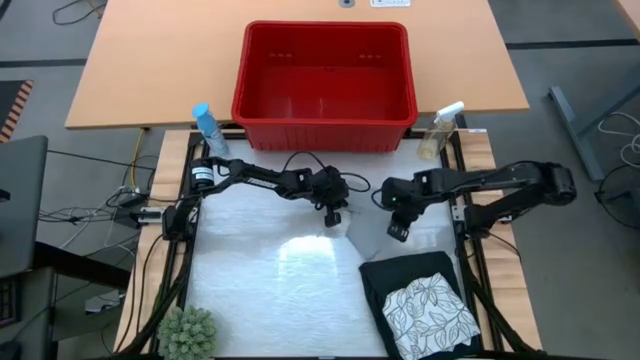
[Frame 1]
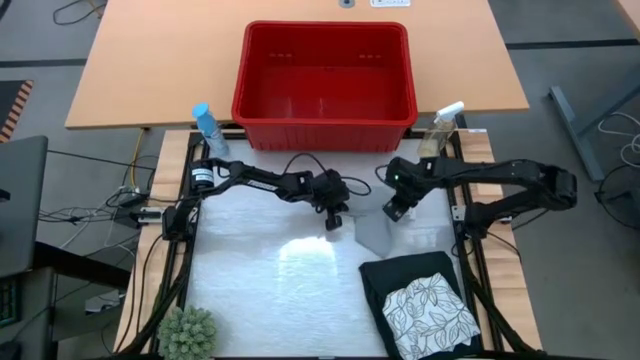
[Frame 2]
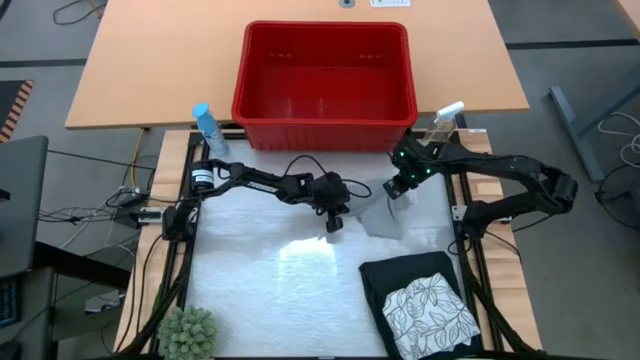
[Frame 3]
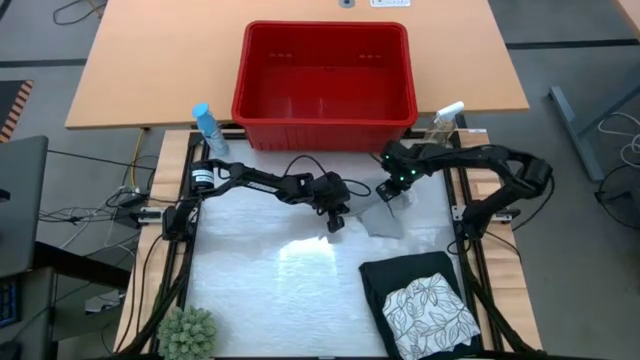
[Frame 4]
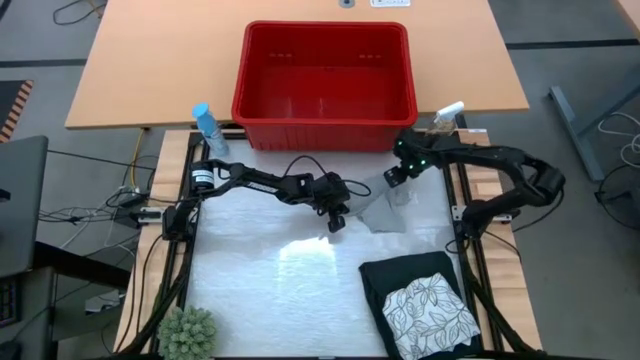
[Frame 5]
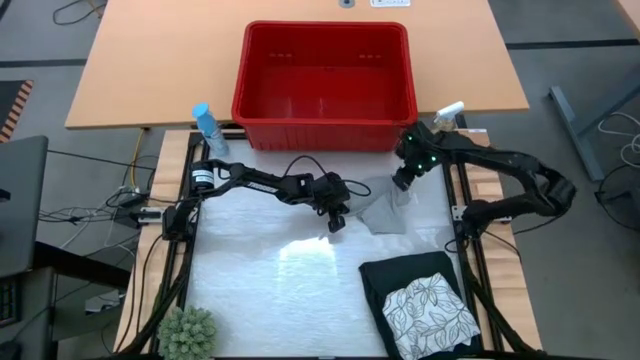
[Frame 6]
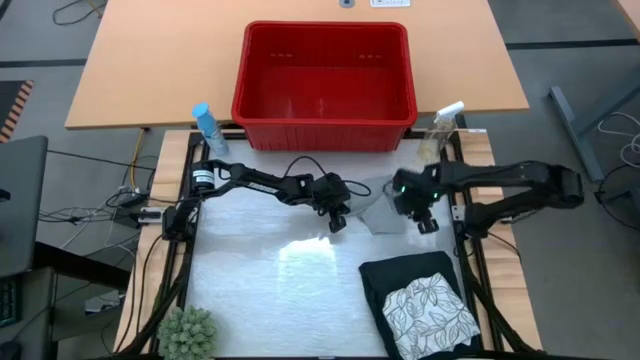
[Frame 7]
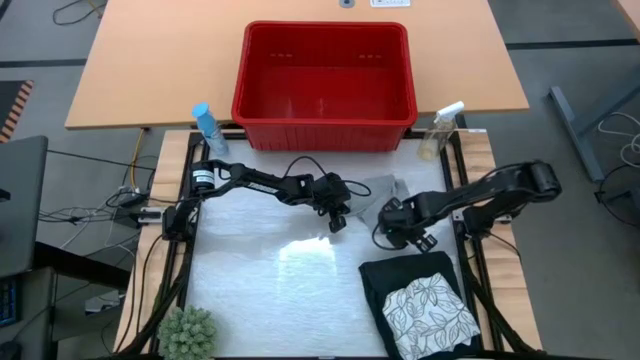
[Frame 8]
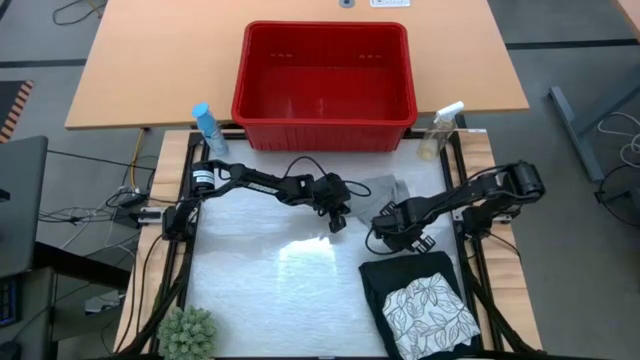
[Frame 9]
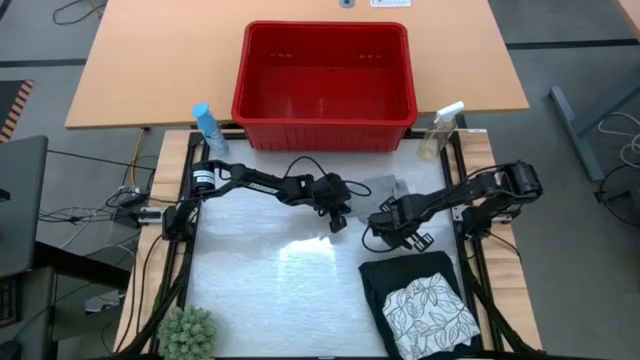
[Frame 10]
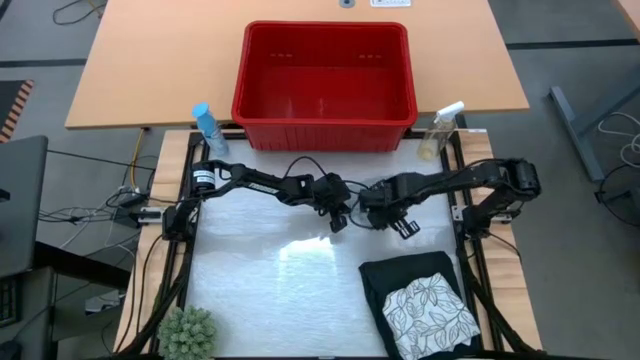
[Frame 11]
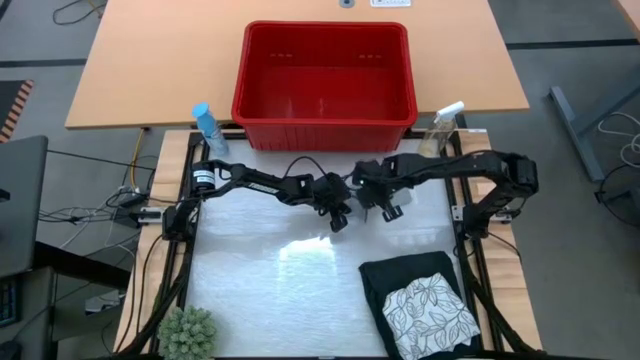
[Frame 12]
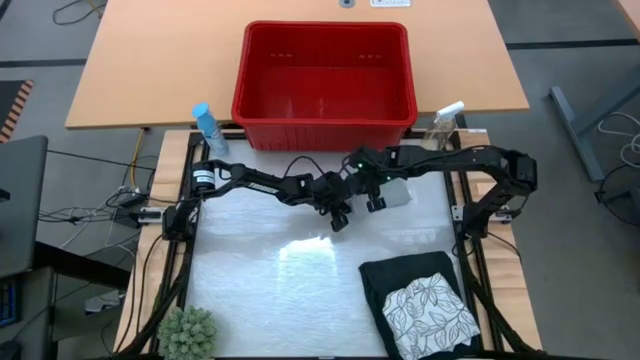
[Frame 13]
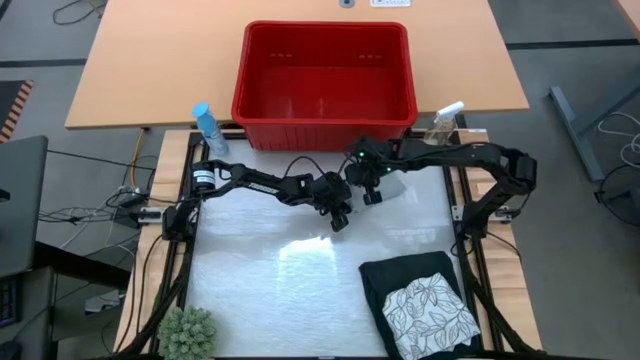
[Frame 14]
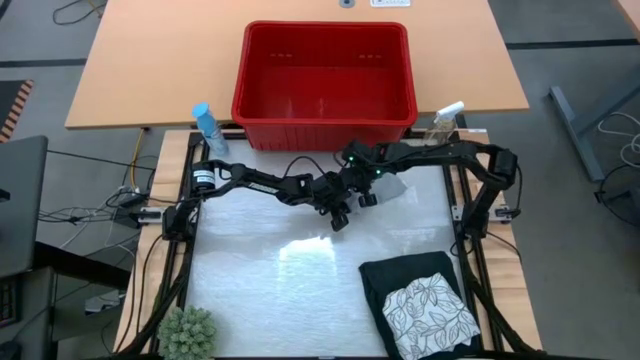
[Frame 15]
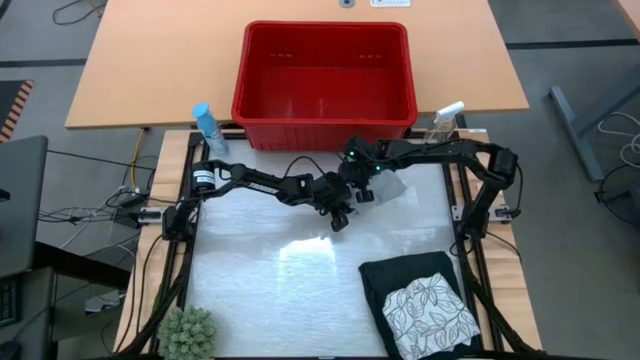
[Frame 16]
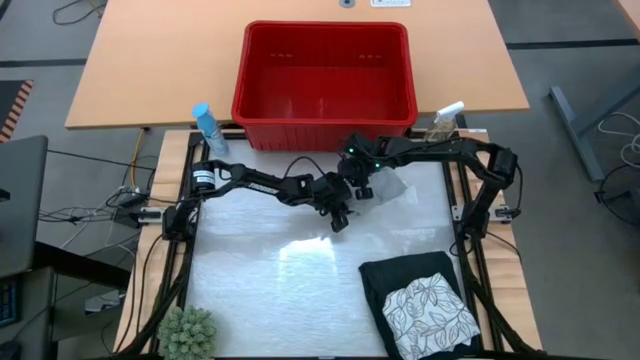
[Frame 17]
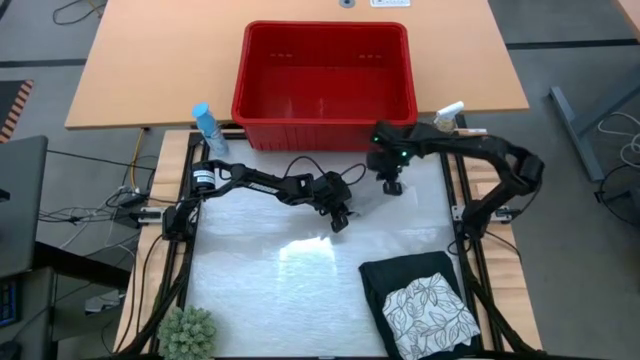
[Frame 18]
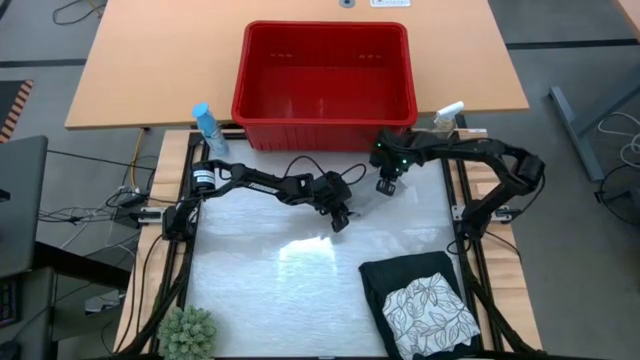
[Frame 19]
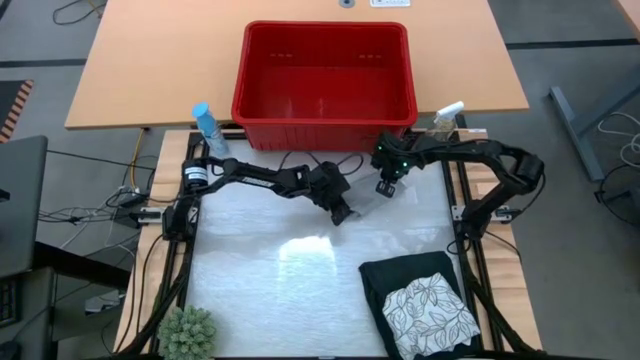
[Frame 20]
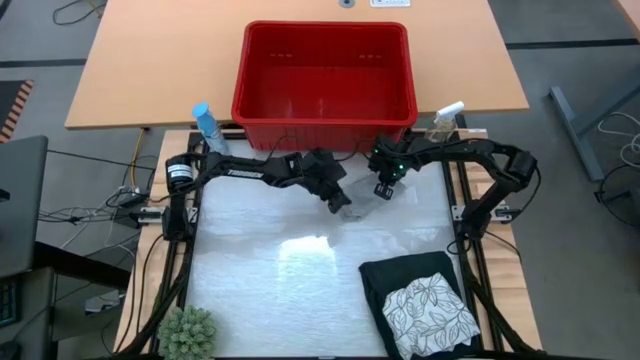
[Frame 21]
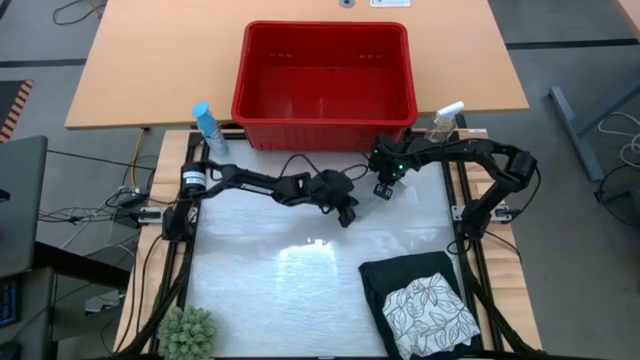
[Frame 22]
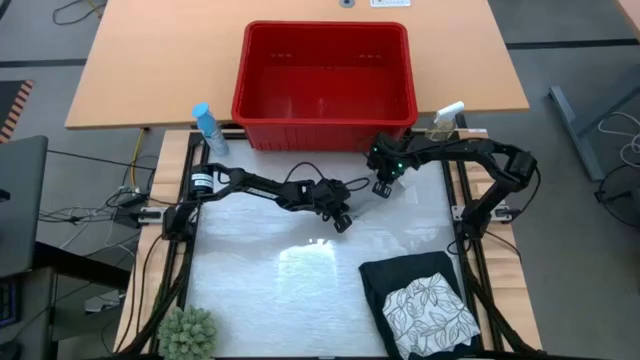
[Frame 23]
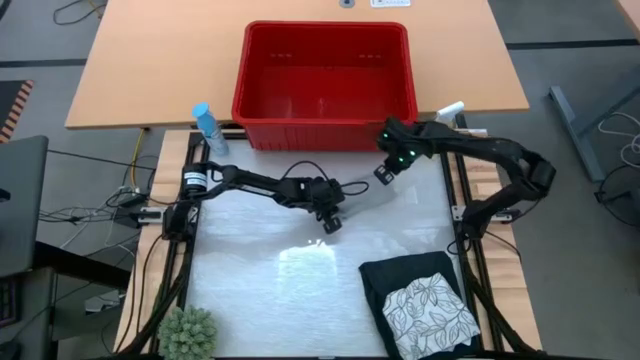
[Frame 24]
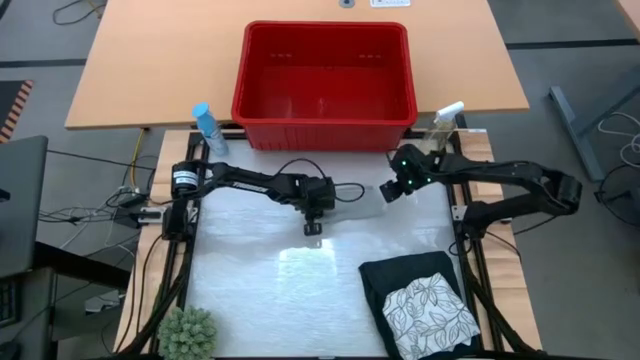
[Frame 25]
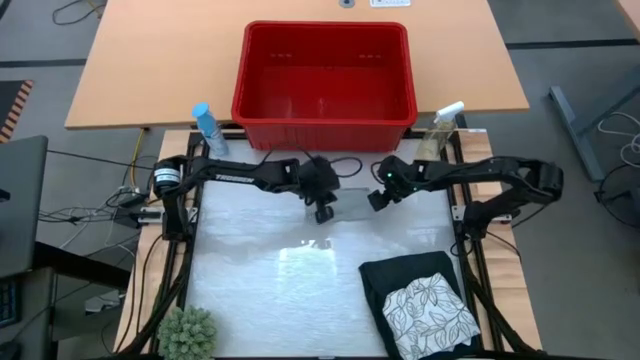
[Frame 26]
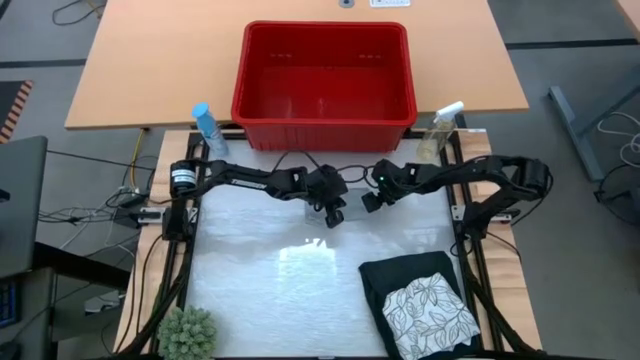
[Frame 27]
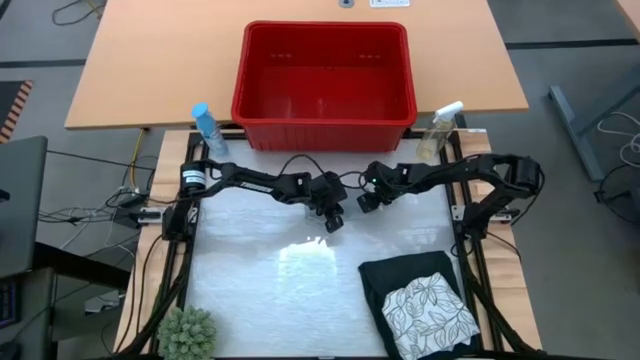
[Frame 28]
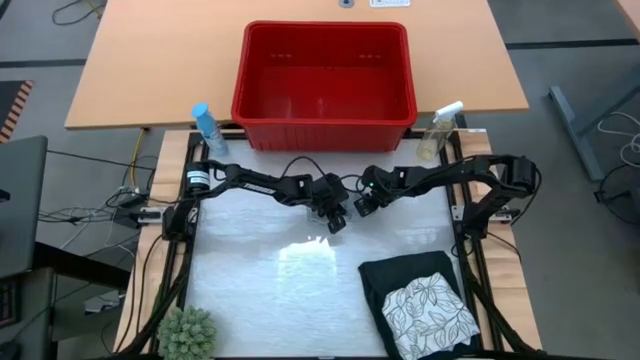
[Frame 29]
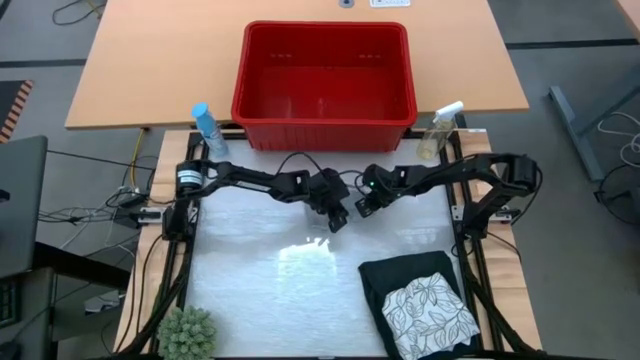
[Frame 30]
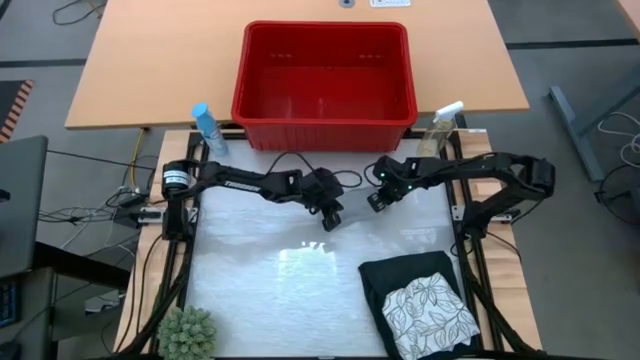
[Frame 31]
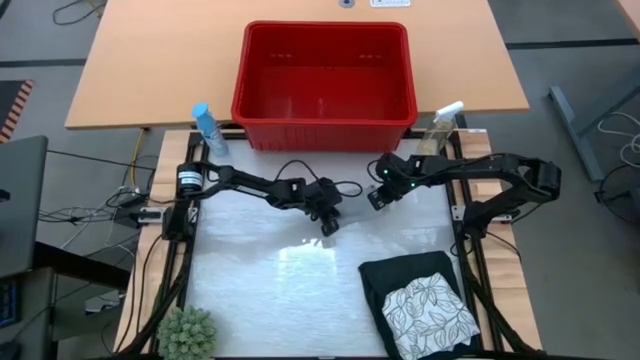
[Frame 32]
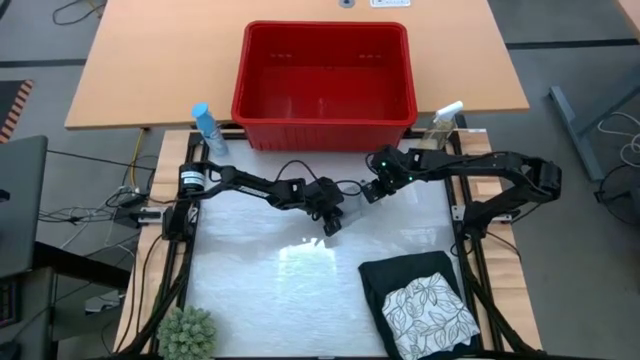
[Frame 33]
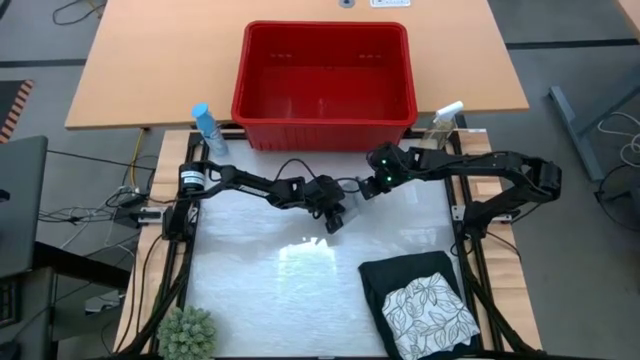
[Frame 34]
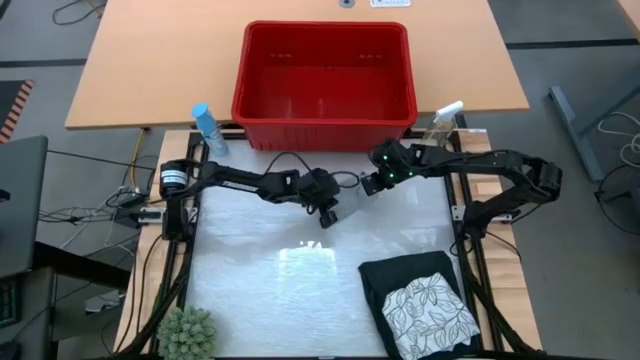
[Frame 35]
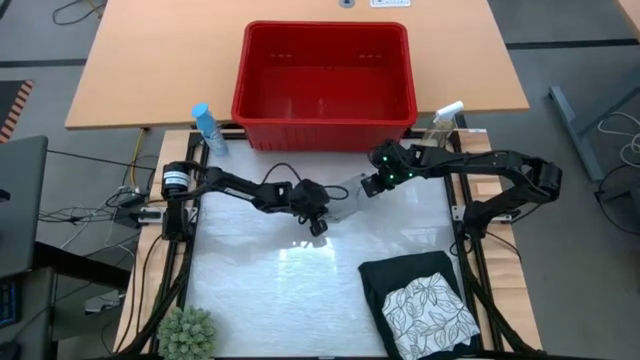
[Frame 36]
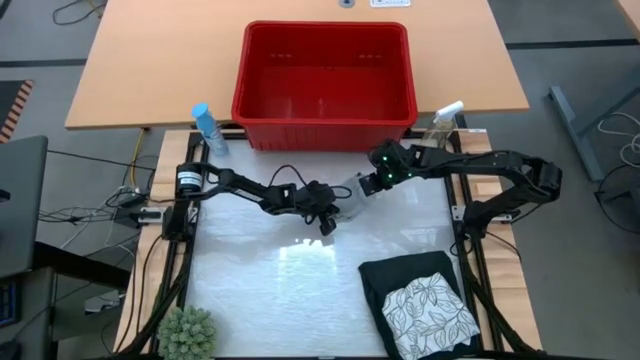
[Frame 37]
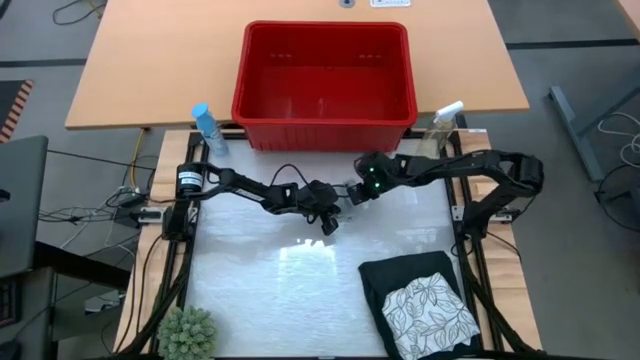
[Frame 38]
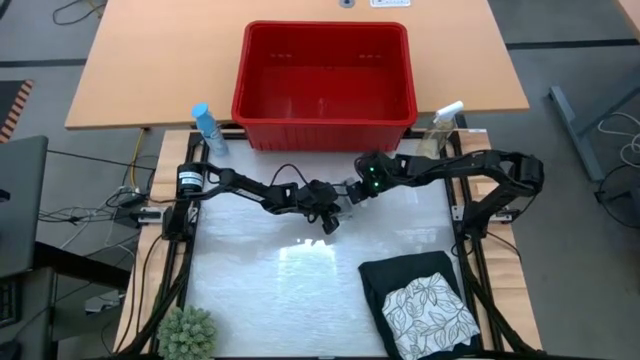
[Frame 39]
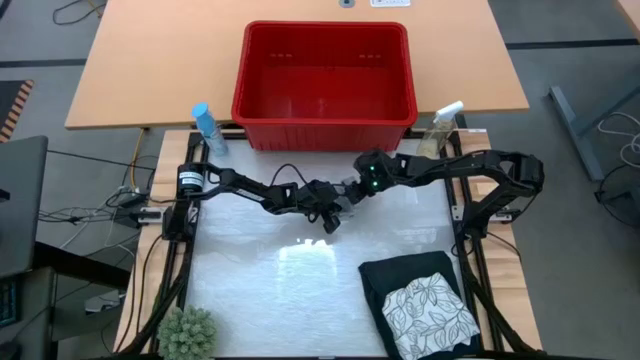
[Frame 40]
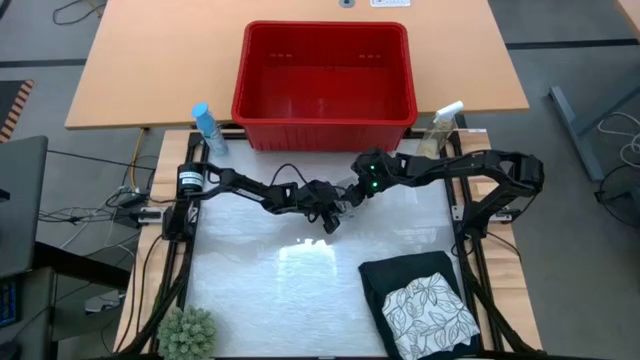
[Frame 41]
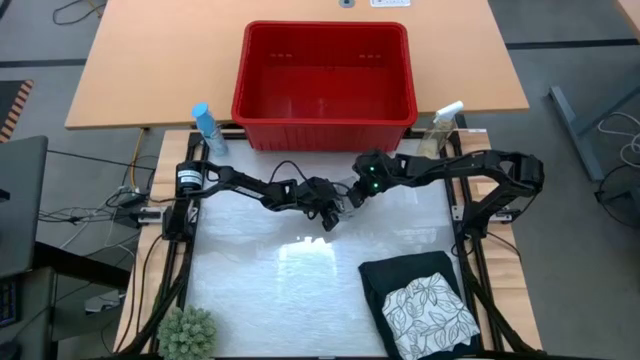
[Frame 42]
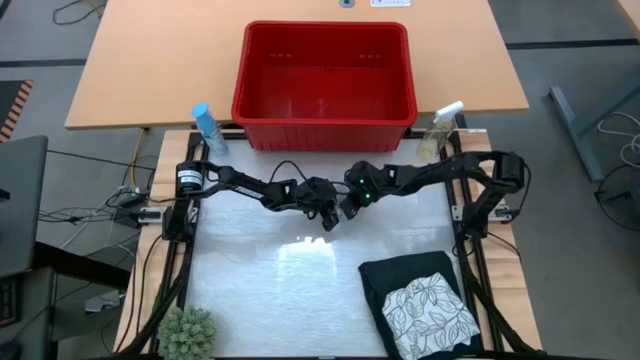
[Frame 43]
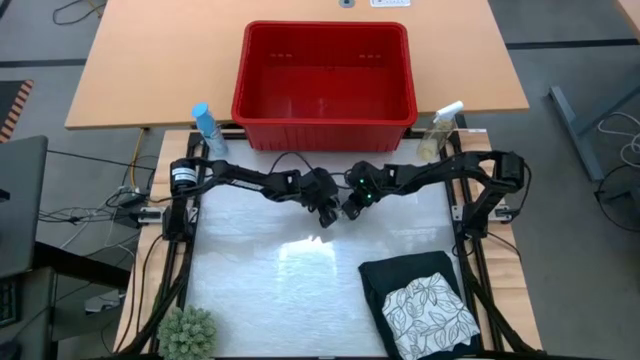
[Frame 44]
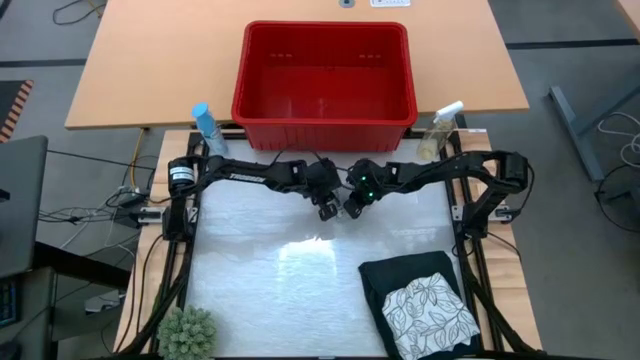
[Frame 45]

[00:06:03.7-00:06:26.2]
Task: Fold laundry
Fold the gray boxer shorts
